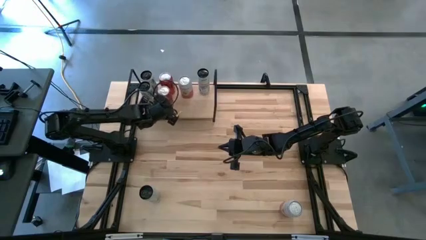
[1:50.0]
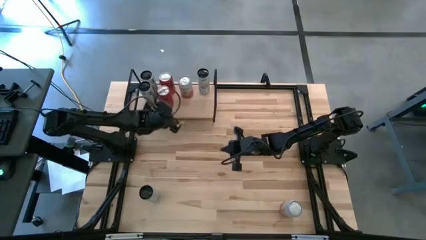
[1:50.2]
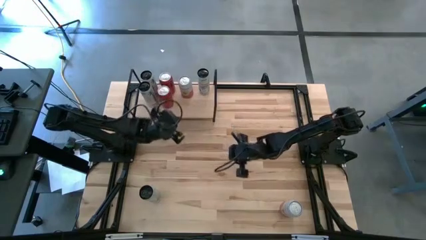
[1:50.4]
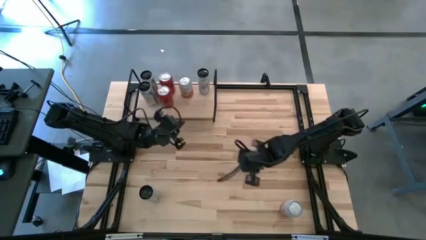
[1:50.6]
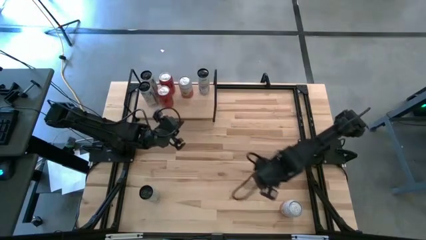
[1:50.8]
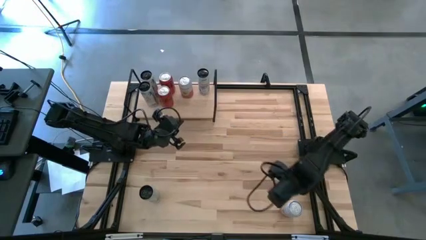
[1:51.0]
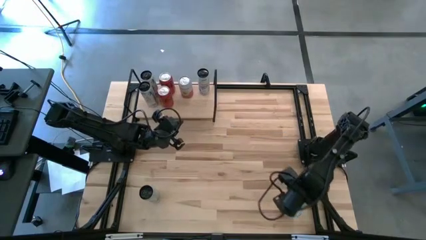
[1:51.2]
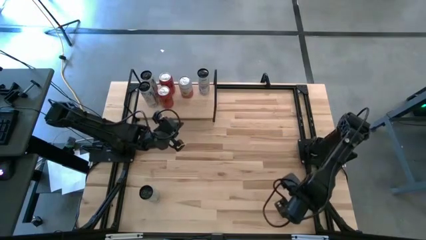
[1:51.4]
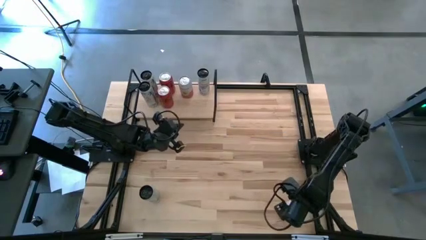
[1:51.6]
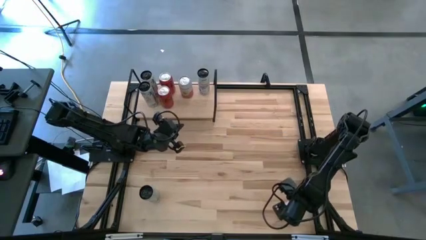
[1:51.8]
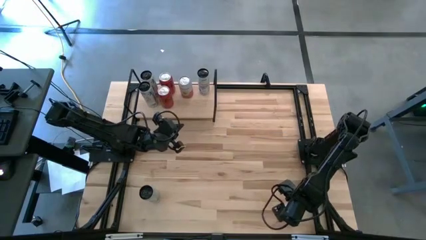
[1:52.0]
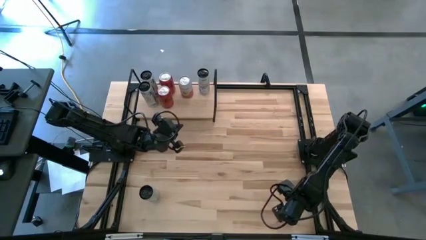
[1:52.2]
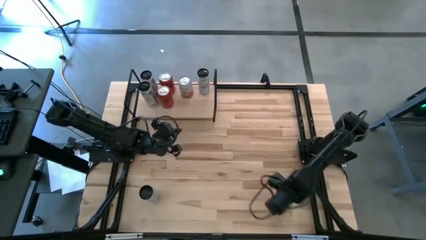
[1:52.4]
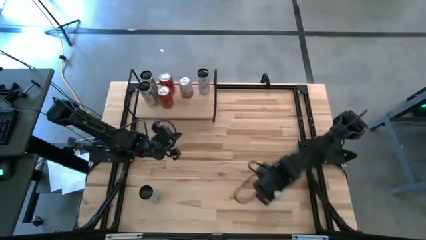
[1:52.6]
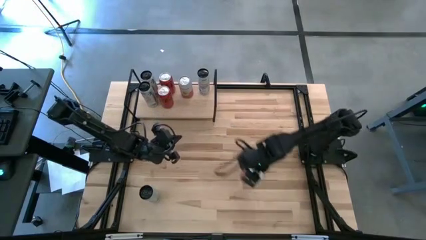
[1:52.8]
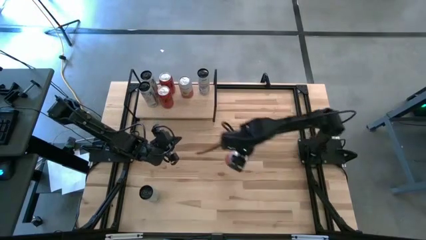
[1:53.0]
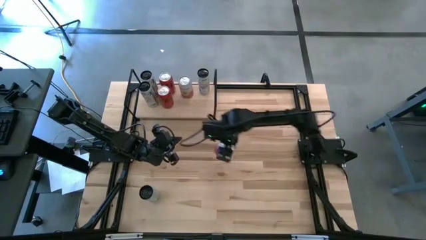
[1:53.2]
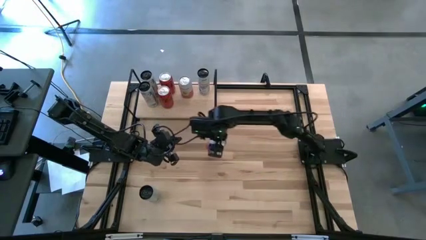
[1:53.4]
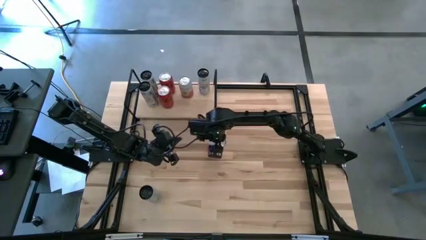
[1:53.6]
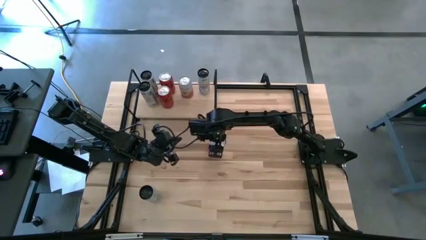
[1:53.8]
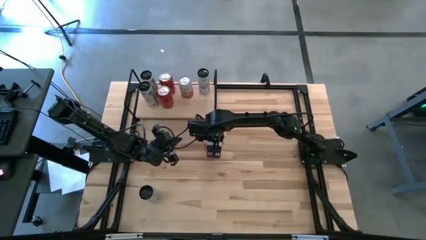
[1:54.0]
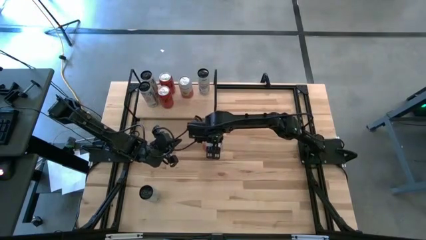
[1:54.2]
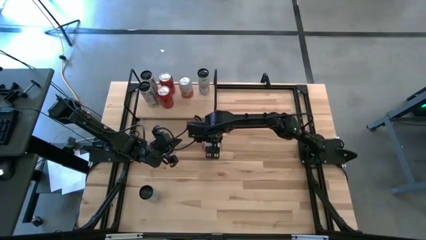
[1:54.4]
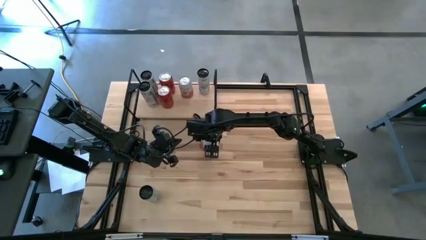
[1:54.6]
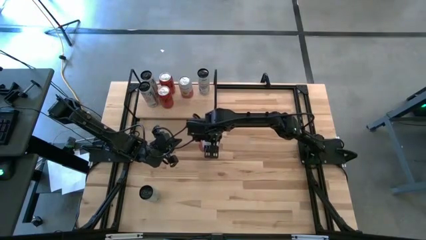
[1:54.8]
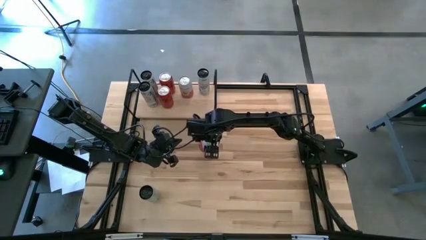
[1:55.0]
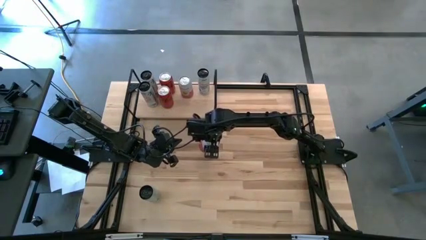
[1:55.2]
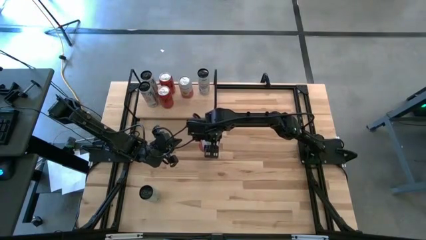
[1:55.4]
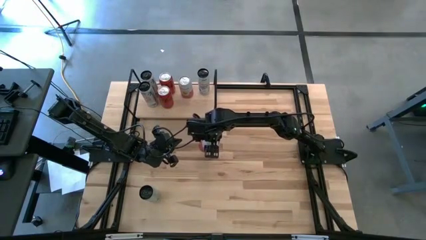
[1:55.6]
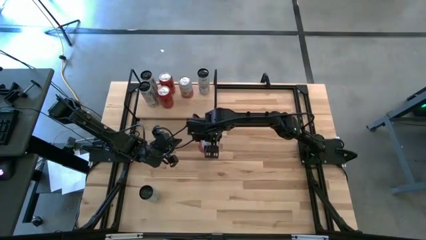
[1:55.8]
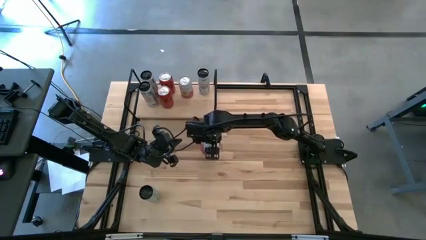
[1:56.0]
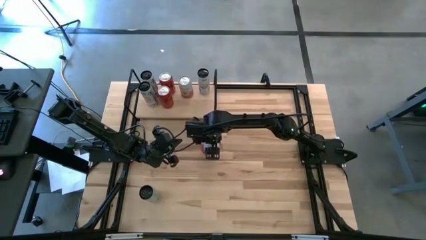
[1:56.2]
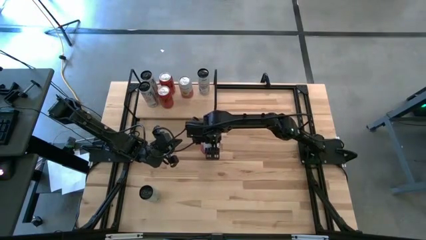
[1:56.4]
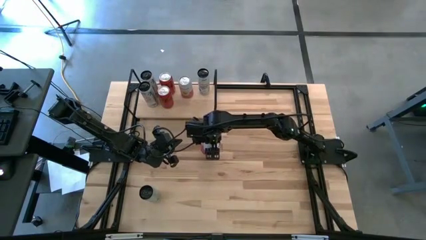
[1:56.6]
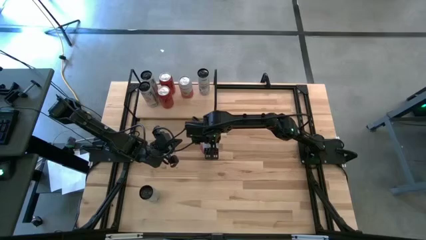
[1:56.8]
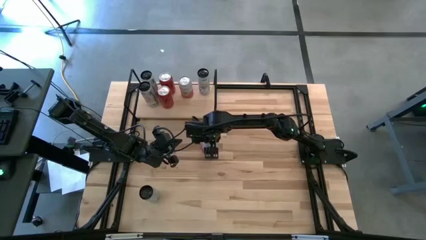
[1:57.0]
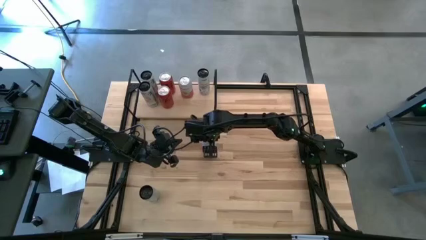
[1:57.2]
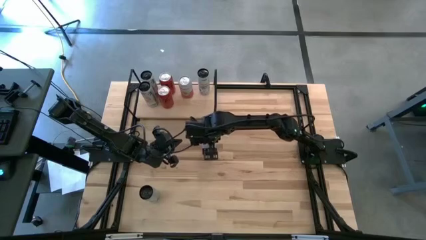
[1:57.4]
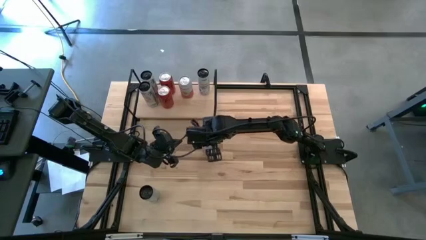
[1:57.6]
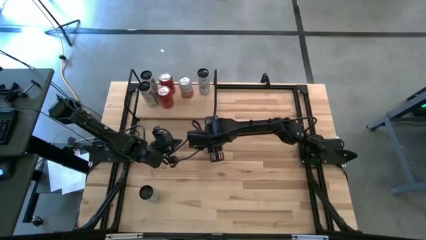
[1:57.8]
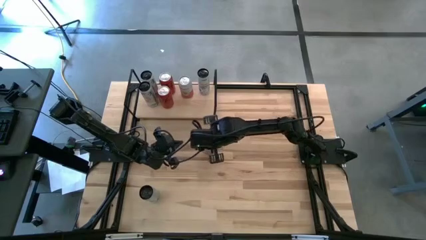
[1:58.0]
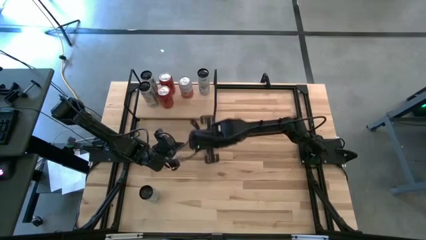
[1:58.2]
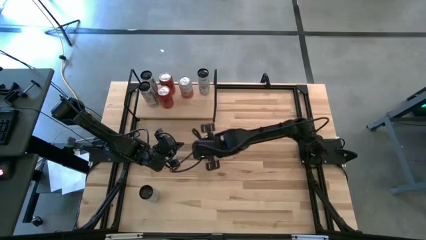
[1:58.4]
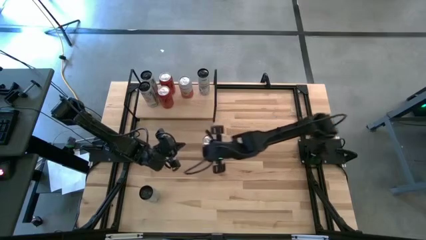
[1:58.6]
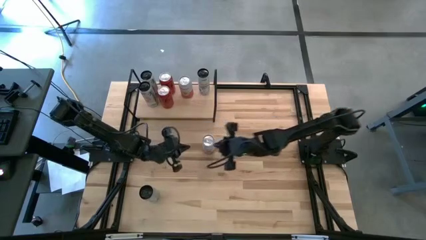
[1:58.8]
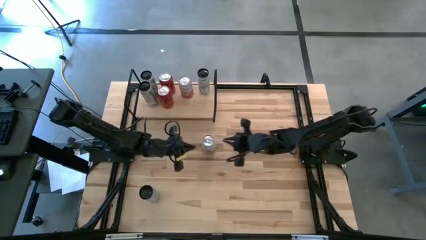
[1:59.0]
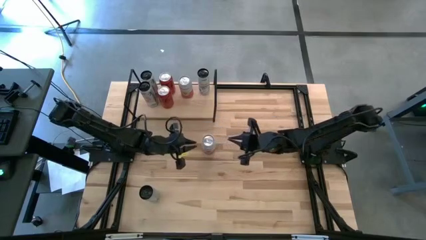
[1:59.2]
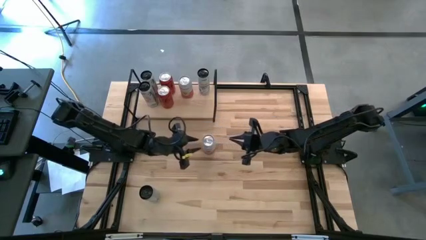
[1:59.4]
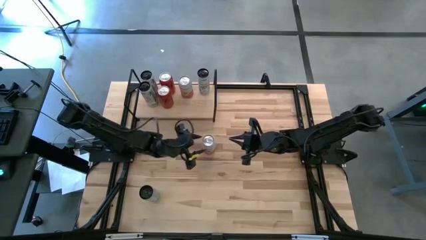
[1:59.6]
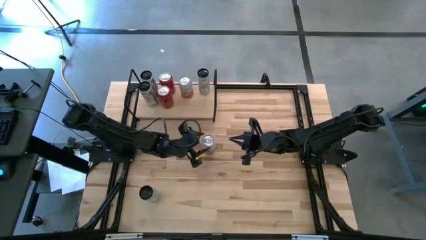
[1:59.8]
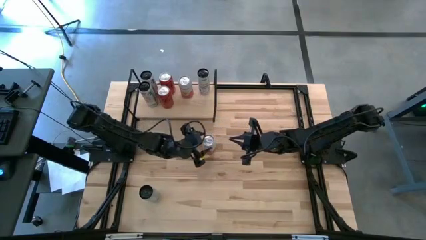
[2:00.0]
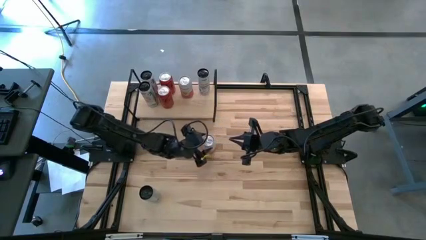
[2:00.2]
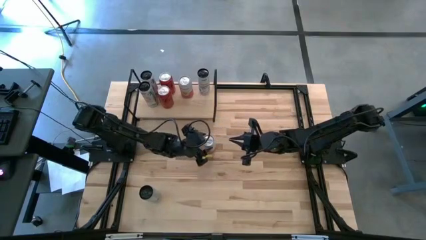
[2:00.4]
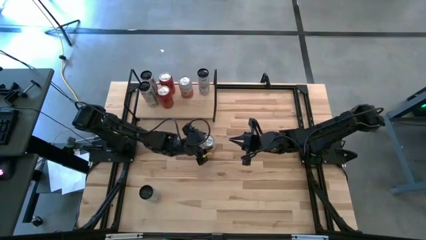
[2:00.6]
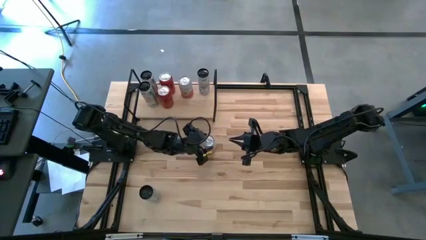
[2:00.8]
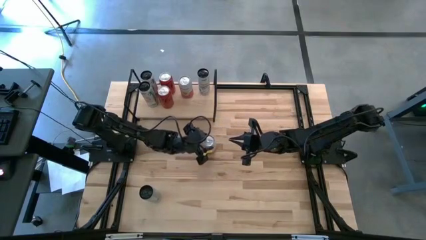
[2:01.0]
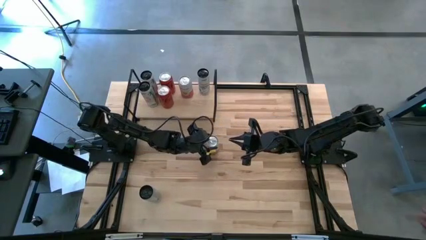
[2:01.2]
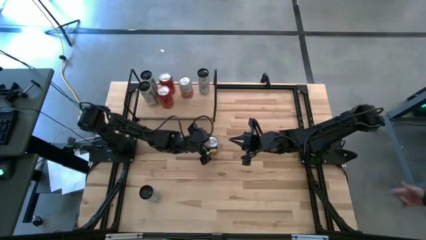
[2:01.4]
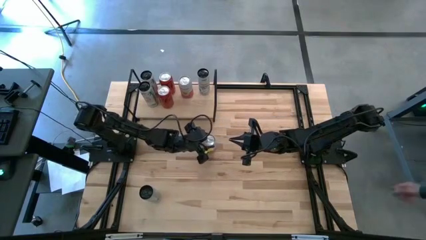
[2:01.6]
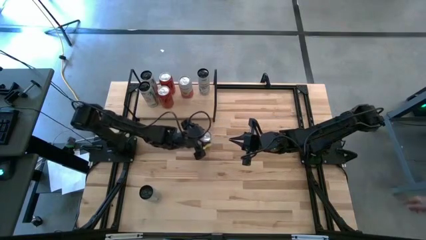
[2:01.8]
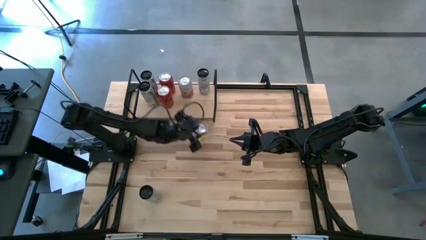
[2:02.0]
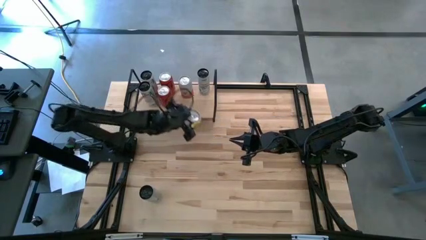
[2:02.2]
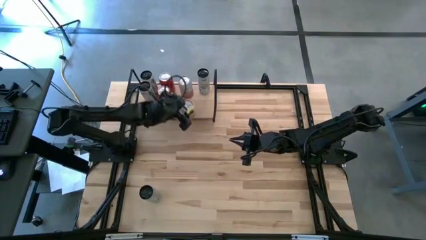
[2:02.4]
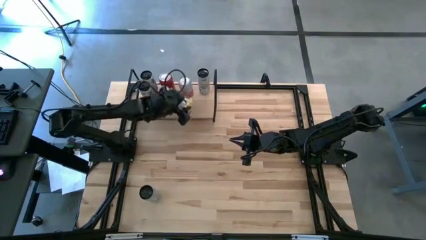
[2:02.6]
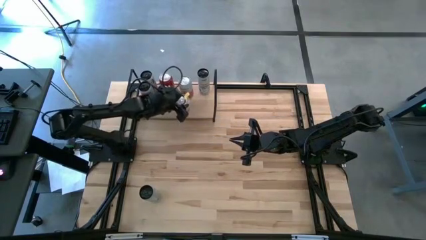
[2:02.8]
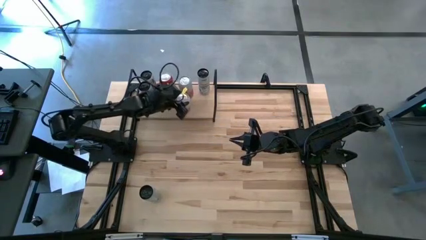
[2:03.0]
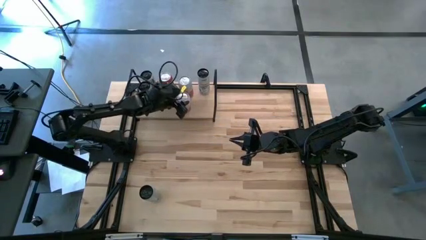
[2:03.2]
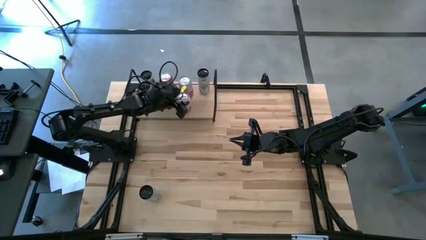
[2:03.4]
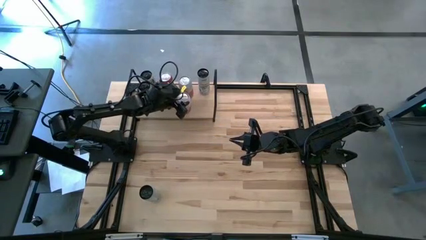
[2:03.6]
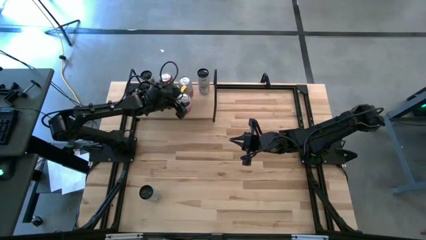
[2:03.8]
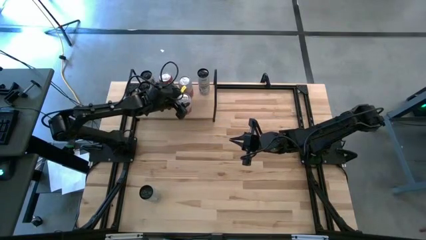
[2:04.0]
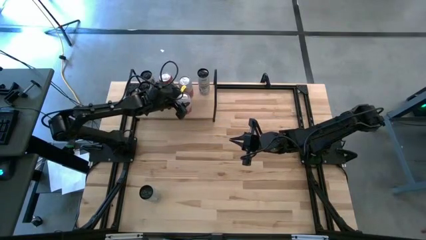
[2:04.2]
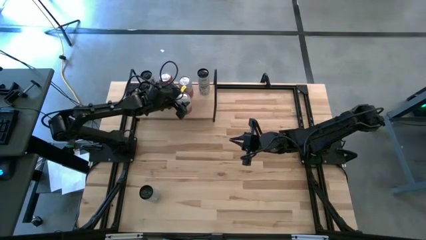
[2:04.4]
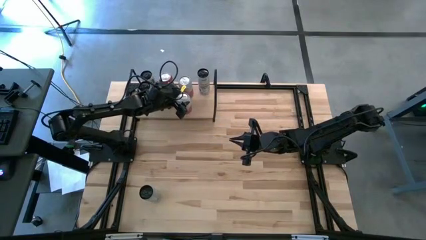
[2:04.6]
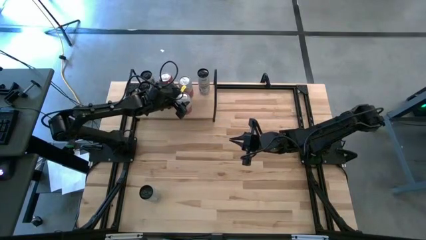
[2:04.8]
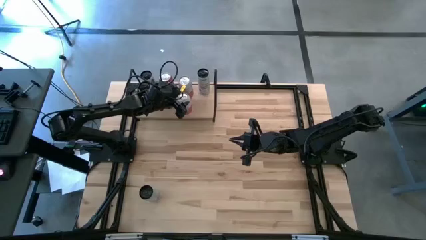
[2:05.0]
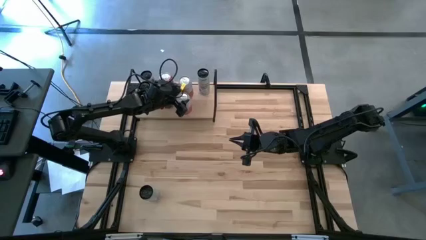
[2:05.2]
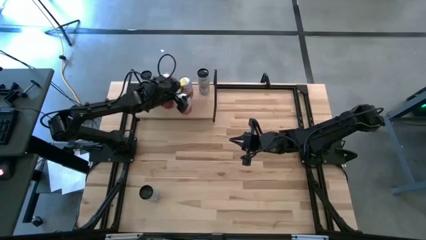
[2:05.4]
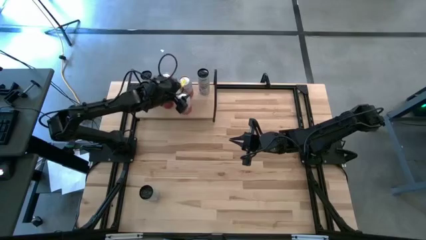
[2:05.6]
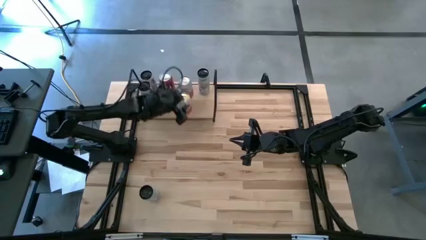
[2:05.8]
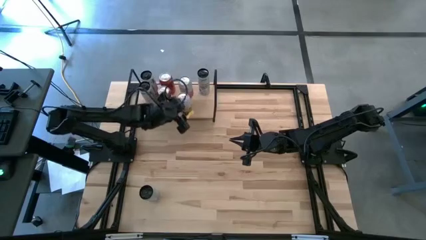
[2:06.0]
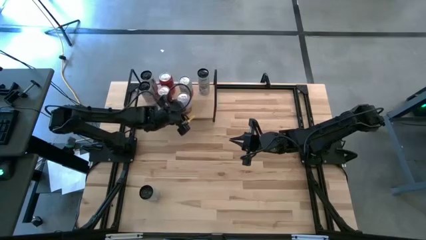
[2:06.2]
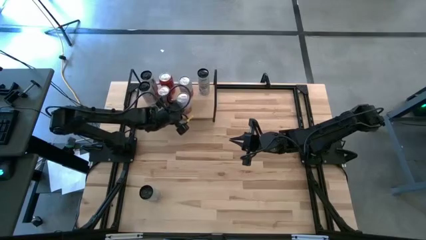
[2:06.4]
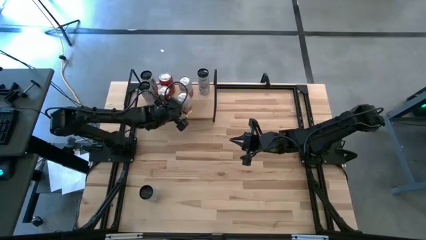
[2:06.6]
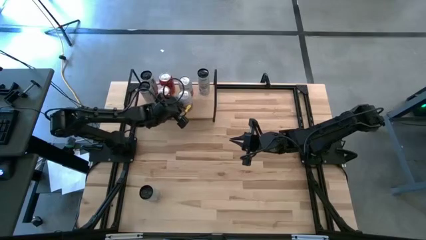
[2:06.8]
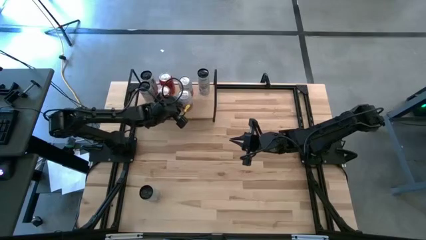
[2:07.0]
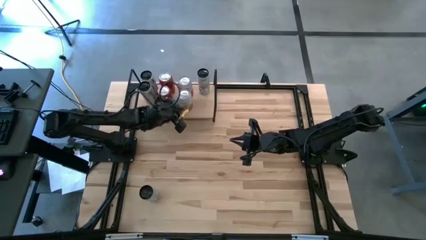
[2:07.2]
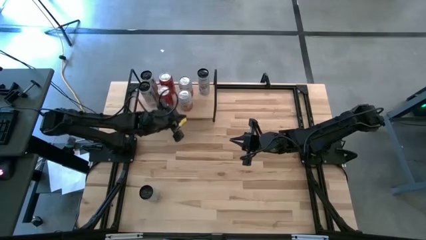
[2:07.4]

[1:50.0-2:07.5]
Task: Place canned beverage on shelf
Put the pink-white soda can on the shelf aligned with the other pink-white soda can
